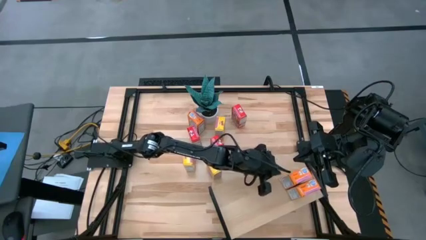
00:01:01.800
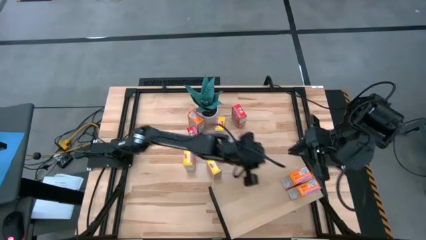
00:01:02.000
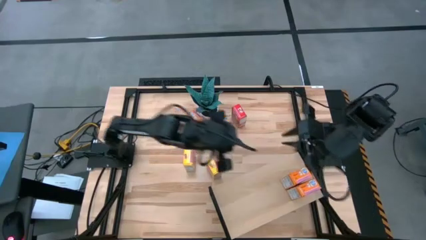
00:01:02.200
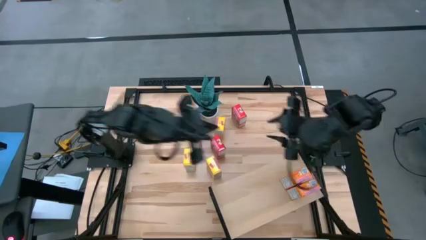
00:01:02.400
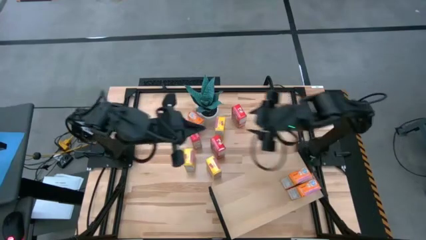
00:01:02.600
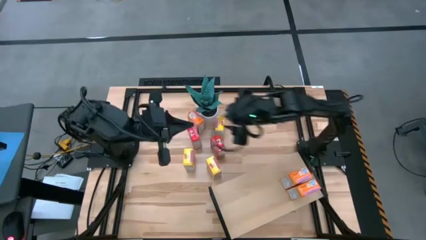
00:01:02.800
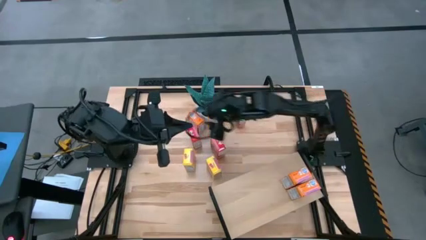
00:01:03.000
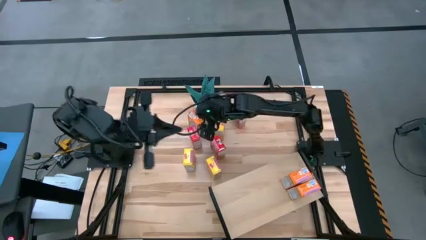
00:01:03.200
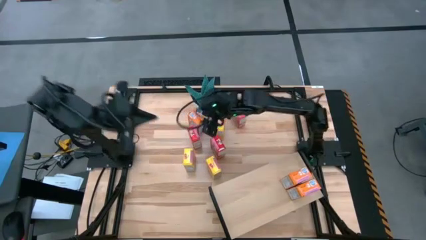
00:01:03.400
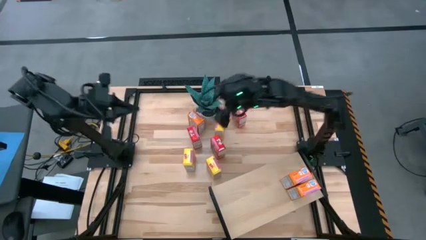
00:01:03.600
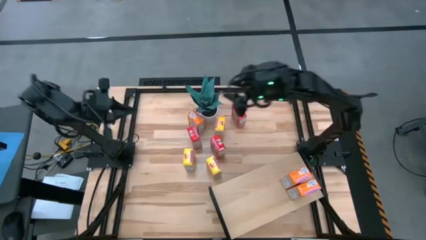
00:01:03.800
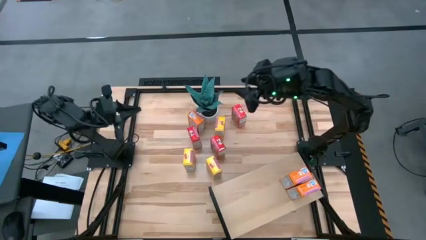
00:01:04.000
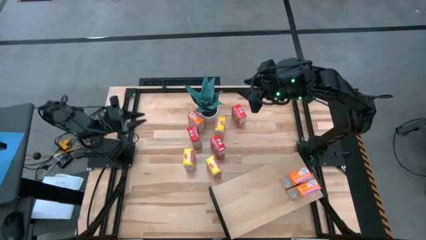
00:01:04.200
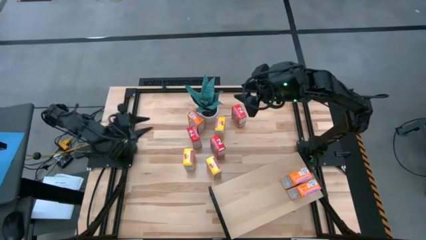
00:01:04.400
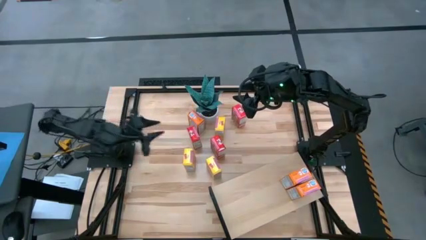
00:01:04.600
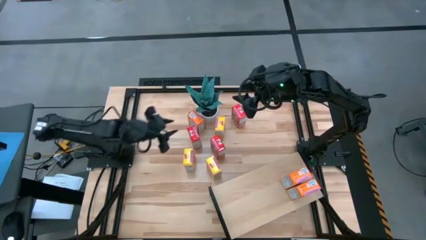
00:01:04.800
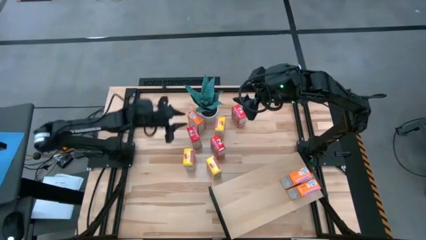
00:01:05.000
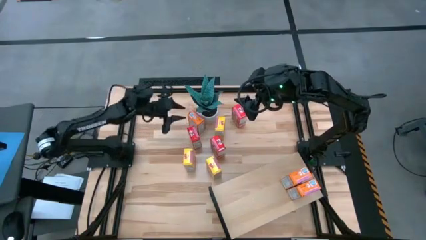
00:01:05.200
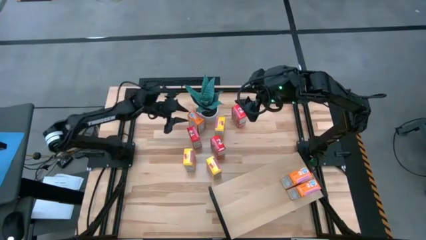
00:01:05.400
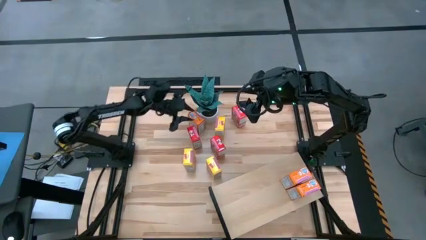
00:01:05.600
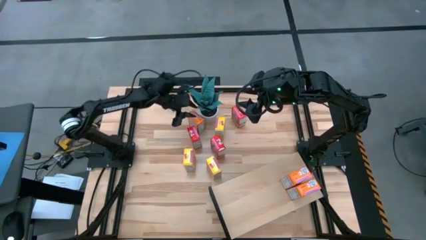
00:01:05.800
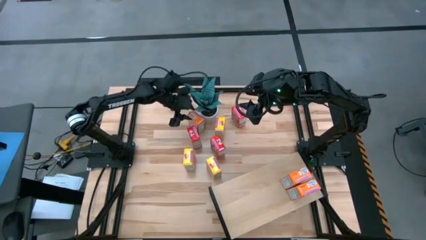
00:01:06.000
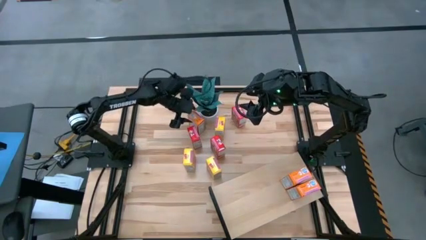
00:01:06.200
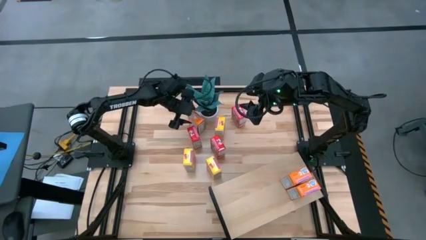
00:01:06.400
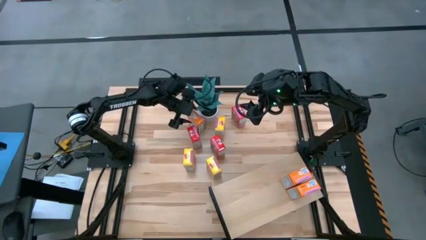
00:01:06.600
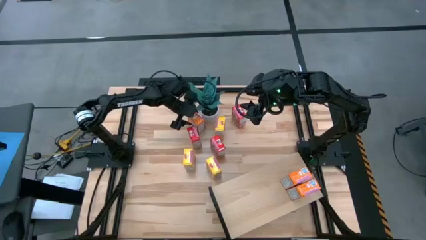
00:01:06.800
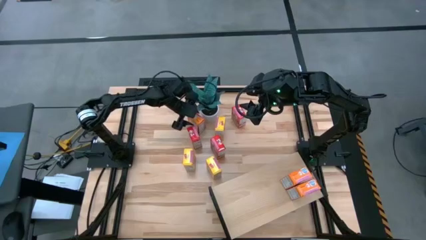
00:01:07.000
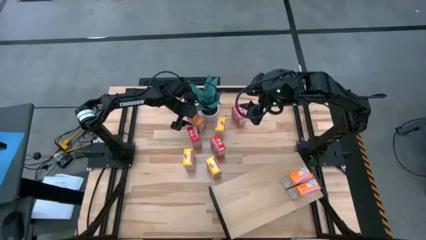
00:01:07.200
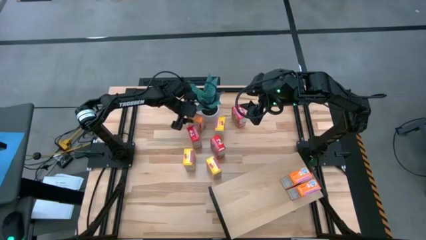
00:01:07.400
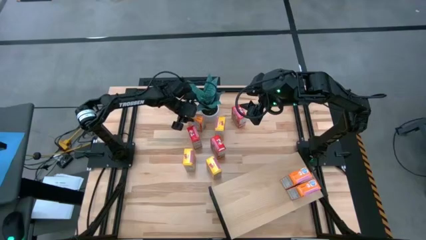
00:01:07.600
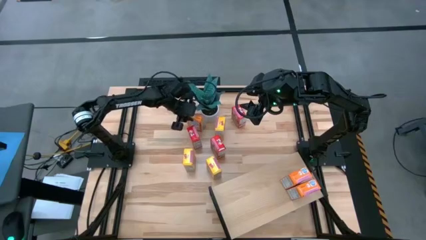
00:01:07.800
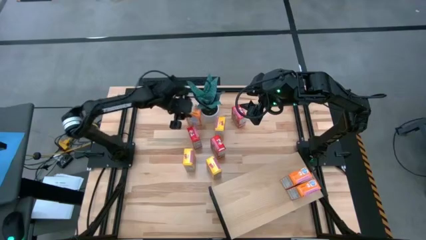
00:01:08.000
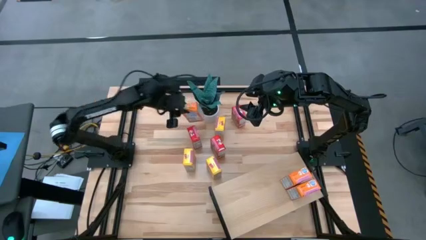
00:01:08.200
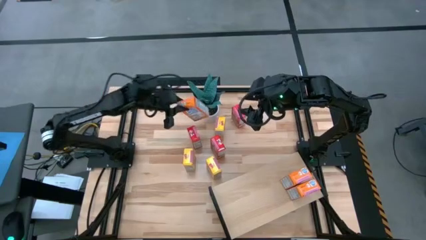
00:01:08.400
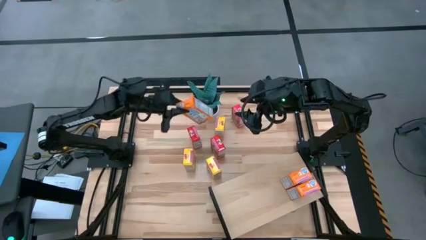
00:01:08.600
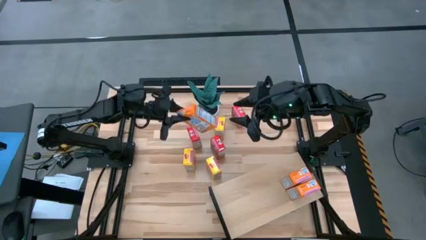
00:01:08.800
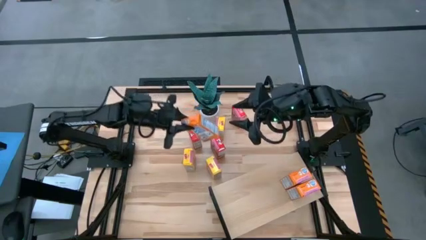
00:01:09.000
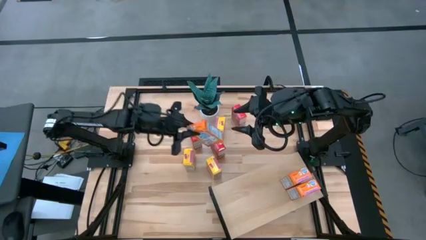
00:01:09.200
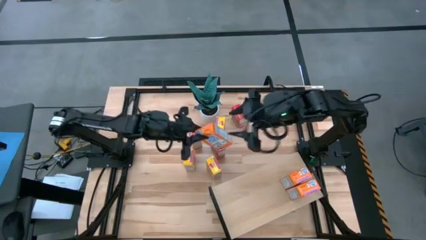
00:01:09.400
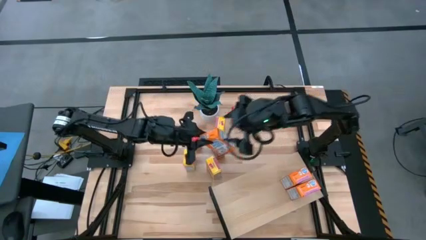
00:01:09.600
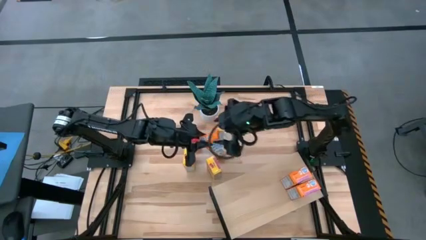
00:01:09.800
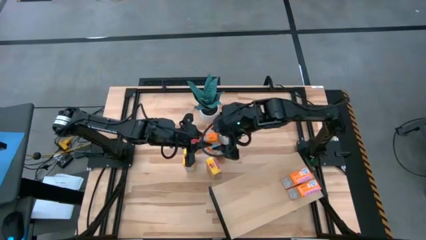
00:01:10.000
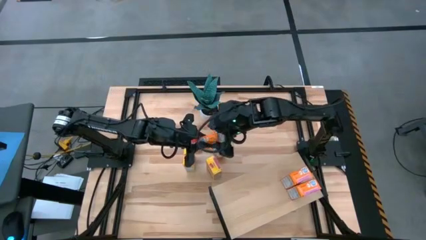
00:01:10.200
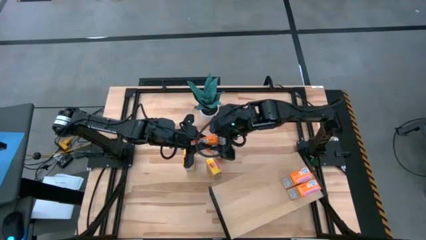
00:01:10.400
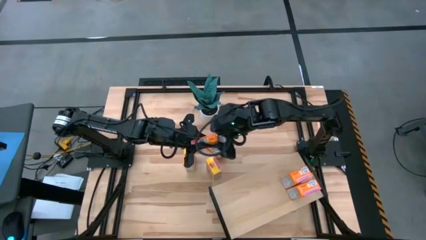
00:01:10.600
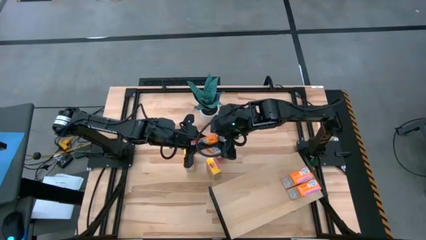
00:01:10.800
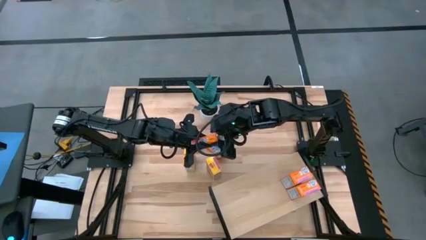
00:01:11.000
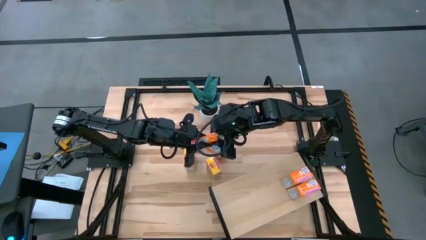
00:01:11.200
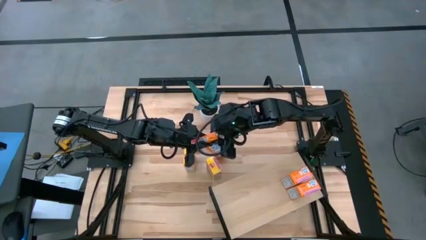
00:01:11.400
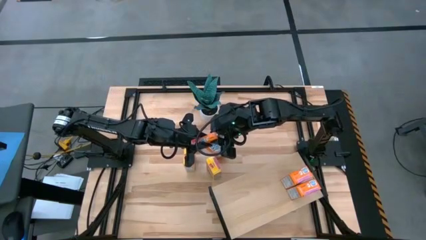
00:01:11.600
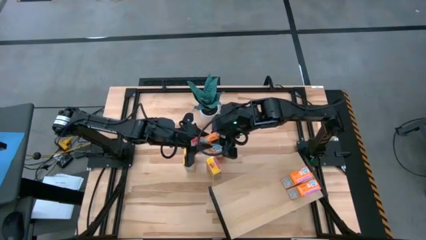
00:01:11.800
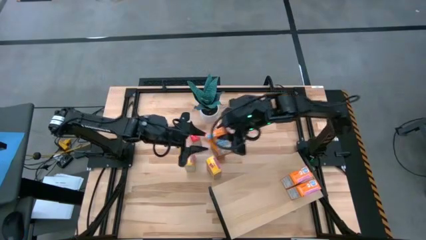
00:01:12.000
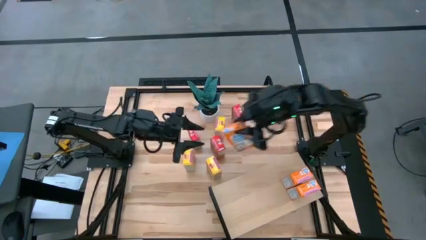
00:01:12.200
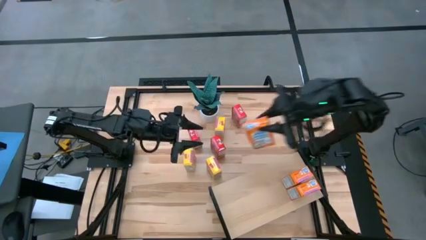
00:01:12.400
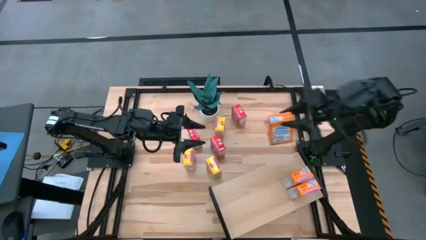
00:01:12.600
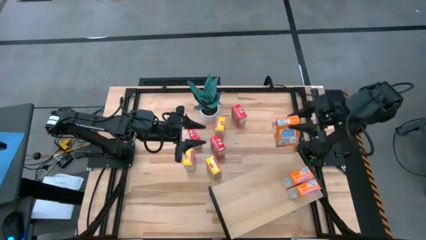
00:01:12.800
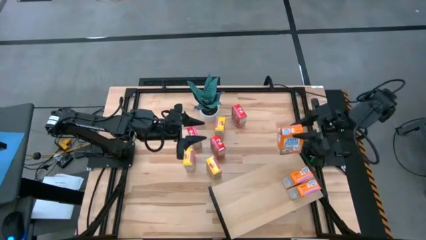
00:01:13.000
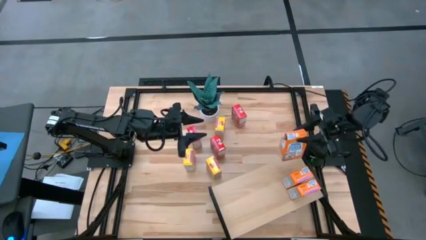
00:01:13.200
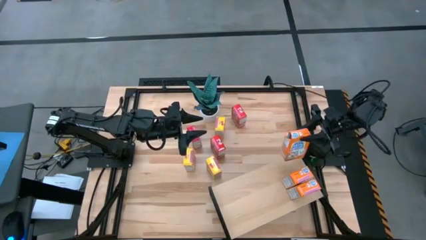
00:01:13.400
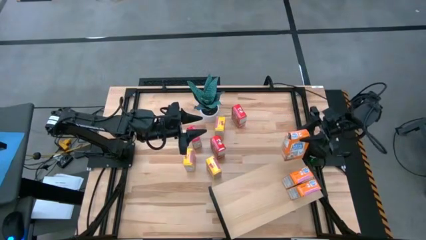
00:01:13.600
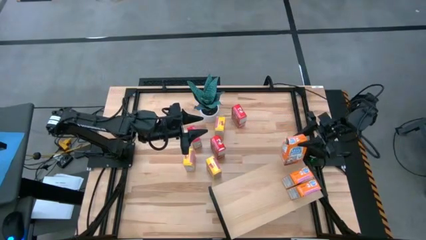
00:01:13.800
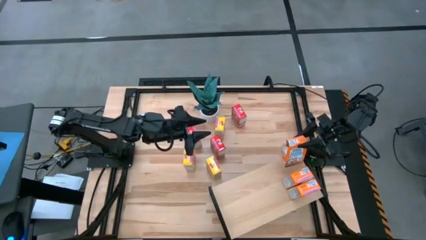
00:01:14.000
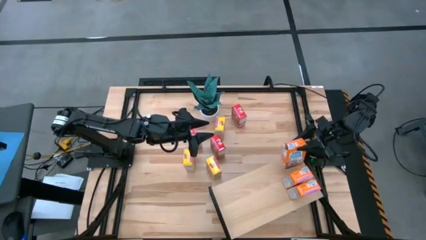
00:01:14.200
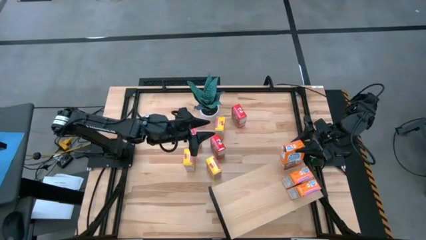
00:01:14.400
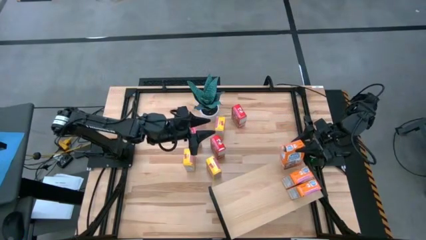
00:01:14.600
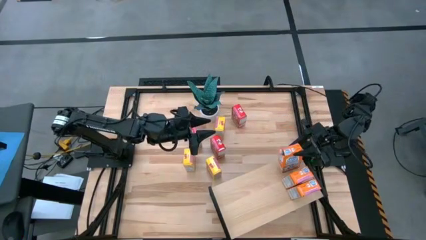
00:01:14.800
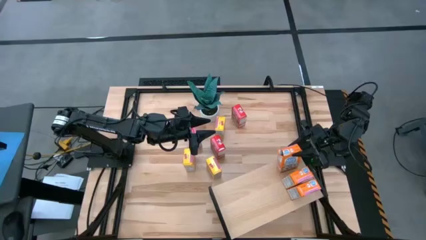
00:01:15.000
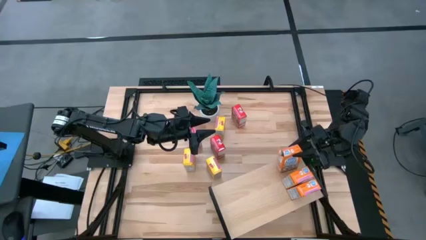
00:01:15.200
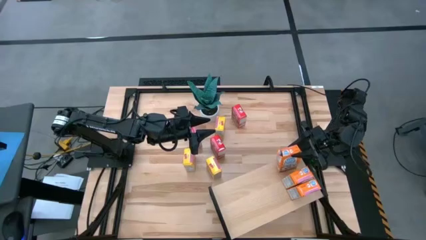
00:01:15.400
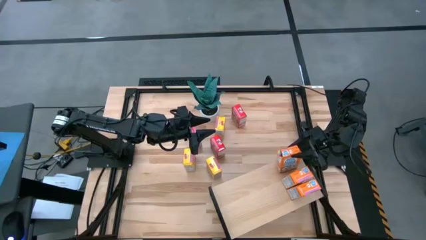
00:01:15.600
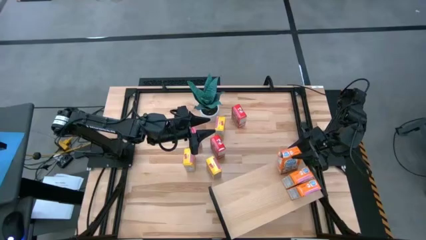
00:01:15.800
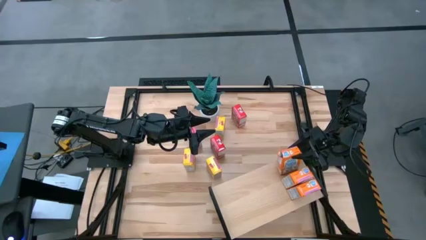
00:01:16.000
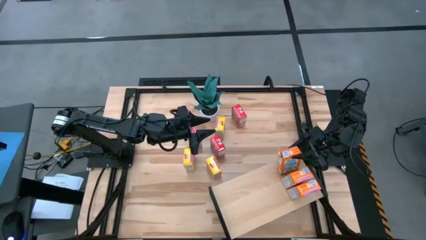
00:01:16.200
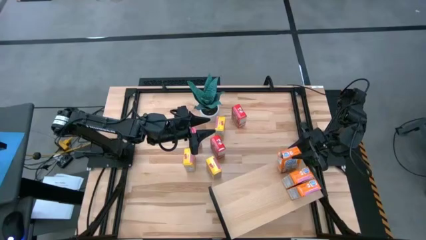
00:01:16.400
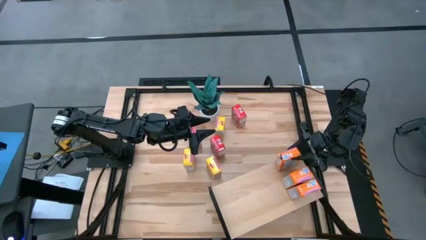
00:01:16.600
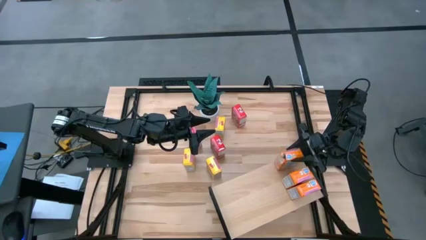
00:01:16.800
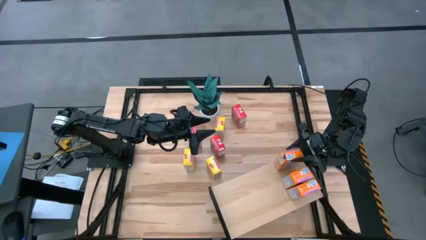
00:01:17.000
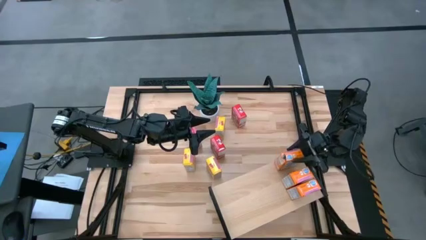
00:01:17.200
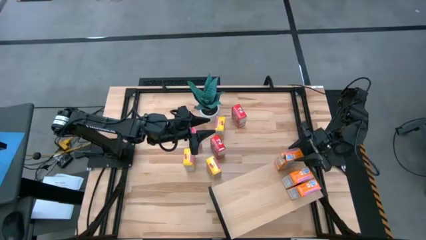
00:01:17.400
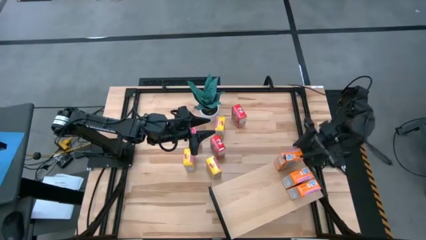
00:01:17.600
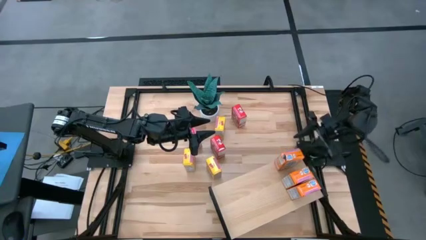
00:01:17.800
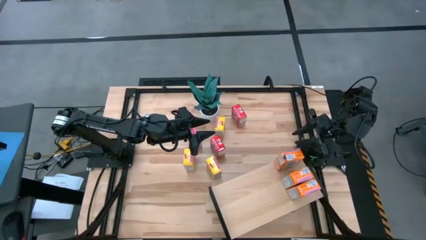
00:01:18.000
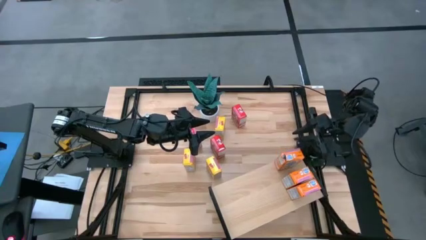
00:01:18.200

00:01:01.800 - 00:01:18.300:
Task: Stack cereal on shelf
Put the orange cereal box on the shelf aligned with the other orange cereal boxes
